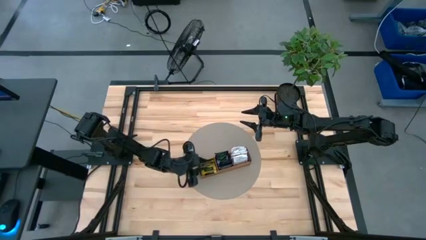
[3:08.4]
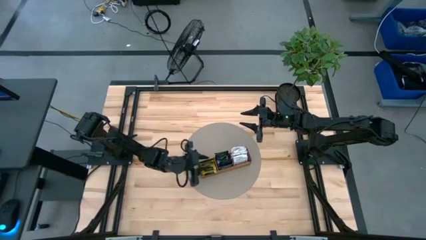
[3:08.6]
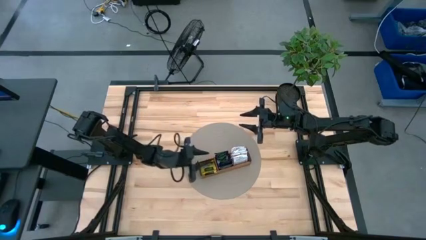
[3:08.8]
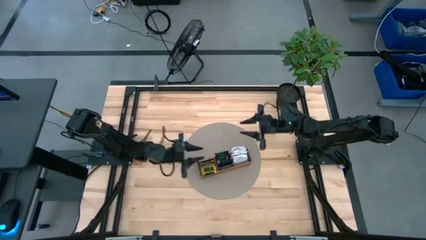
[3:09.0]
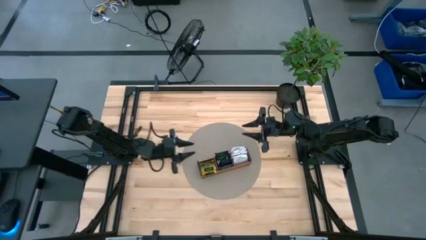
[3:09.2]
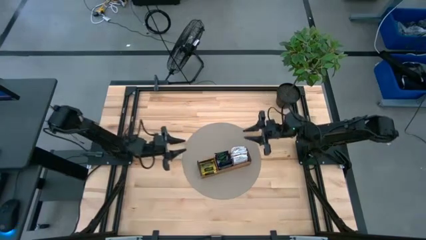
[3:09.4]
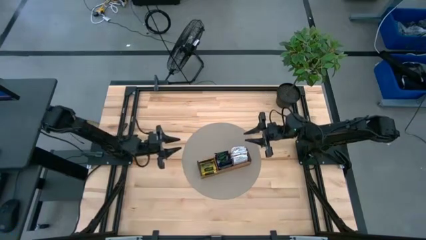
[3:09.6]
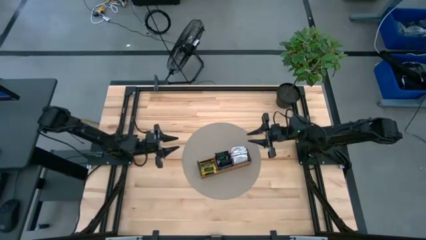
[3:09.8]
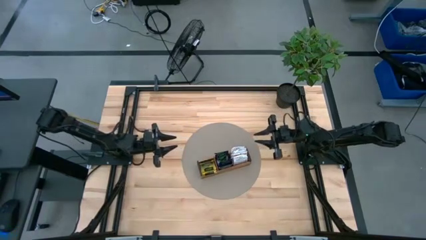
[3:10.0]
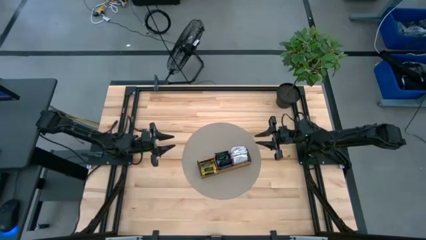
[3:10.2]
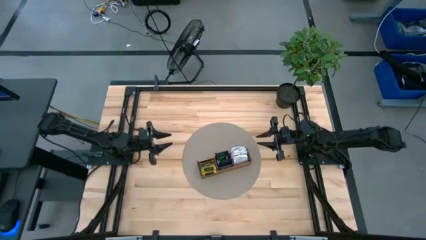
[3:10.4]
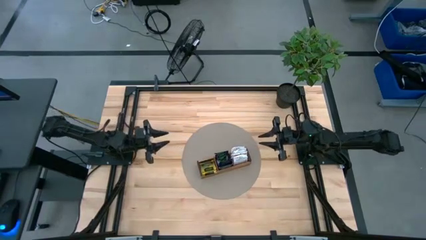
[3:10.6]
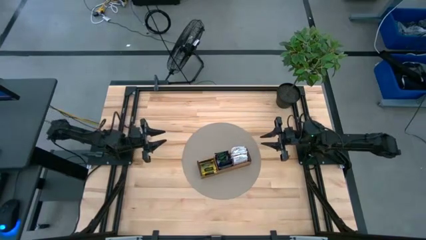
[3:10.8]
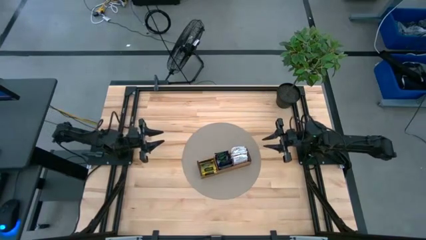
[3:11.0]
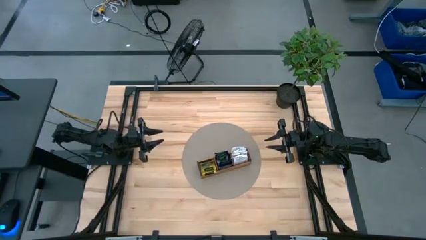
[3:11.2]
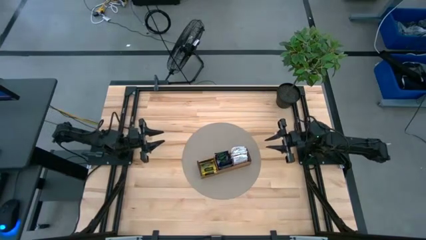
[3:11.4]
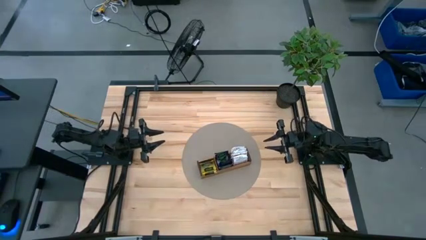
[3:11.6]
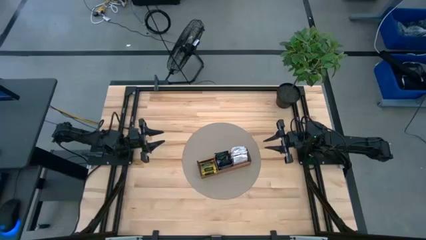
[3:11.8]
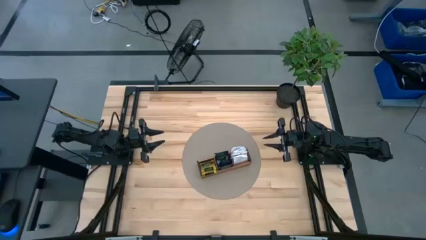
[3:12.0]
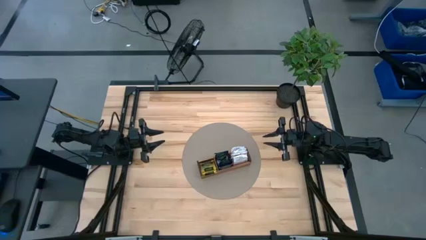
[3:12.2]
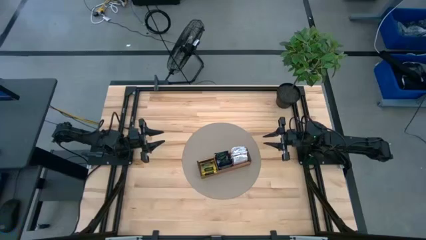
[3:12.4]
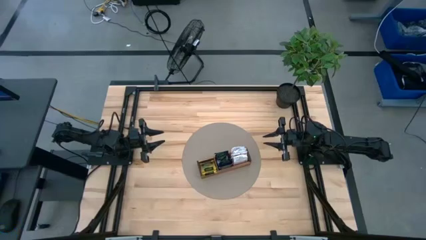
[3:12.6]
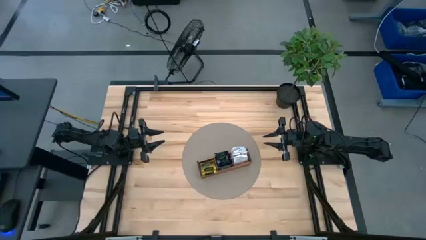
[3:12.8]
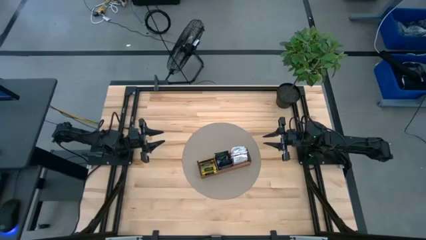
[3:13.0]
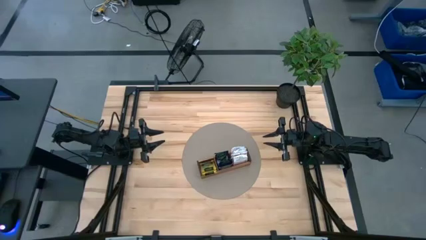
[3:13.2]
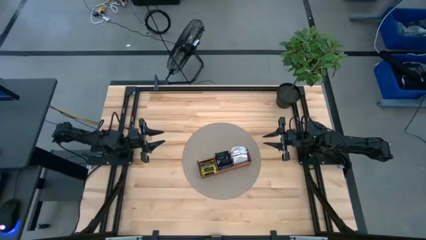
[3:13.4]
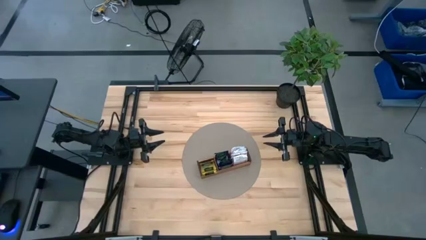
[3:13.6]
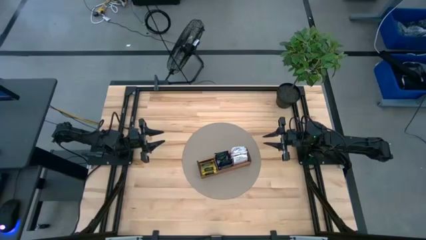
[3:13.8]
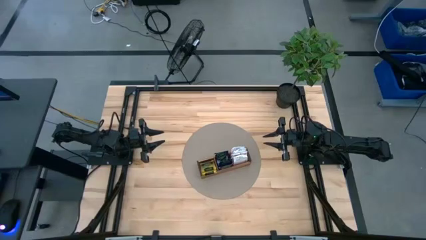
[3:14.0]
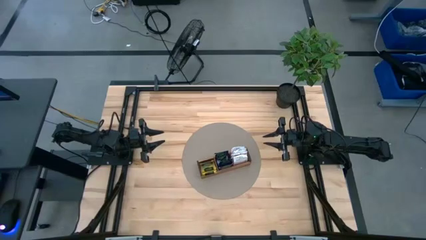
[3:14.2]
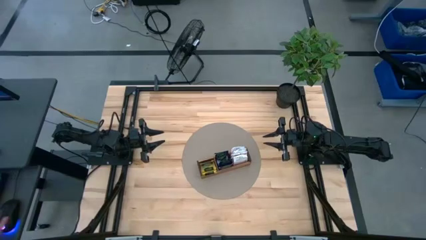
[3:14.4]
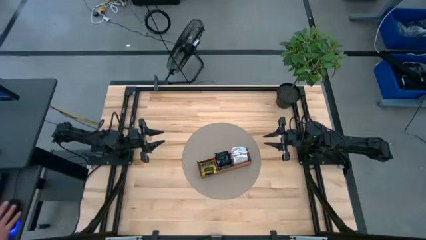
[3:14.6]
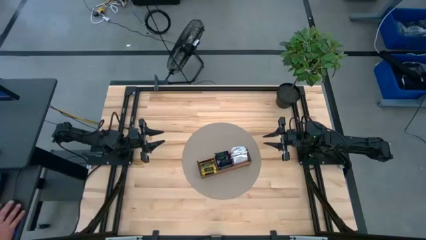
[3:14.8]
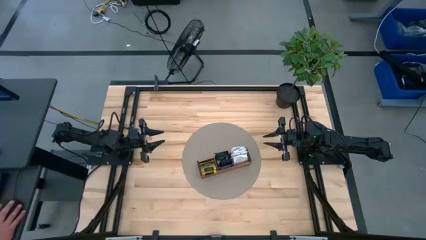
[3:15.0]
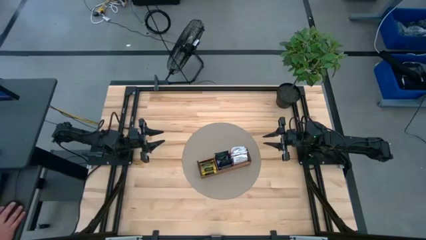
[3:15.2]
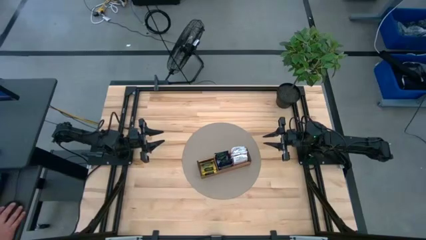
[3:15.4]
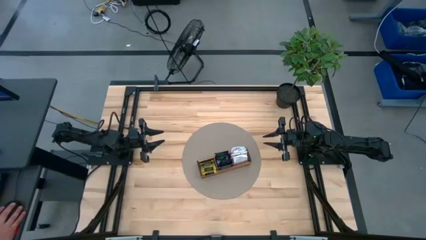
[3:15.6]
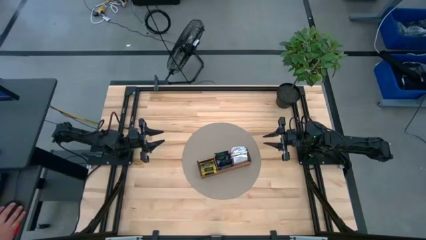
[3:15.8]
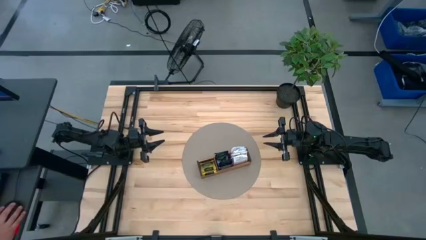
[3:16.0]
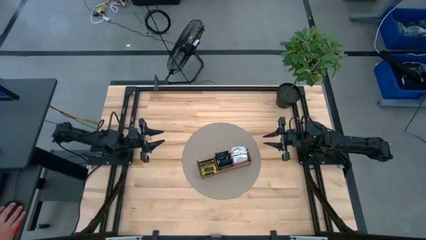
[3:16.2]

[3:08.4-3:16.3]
Task: Pick & Place Tea
Return to Home Position

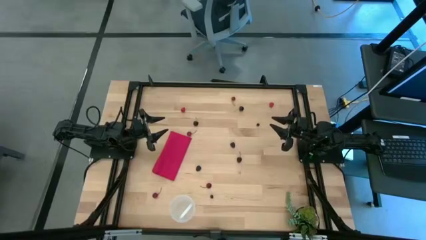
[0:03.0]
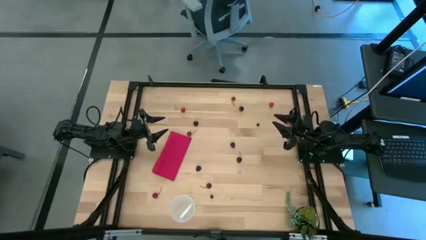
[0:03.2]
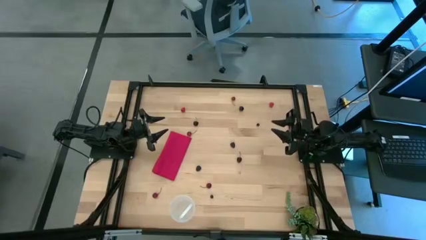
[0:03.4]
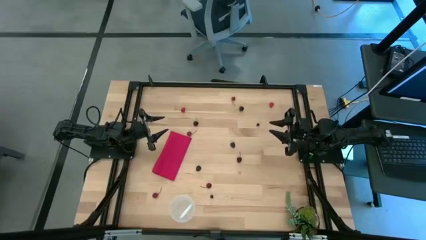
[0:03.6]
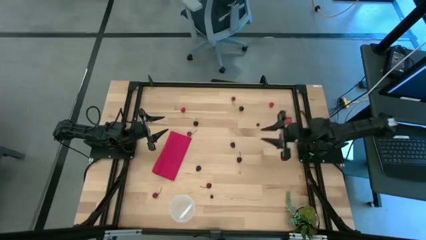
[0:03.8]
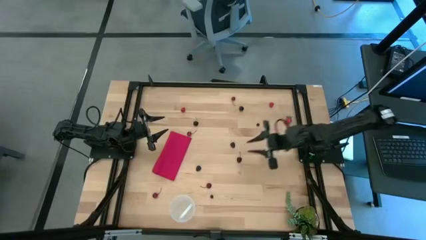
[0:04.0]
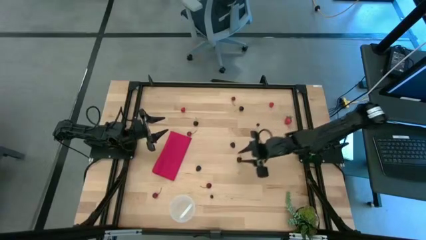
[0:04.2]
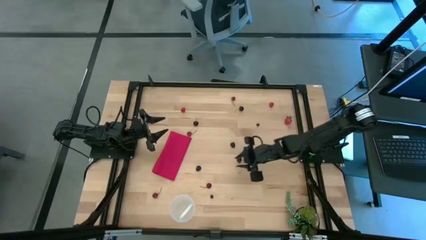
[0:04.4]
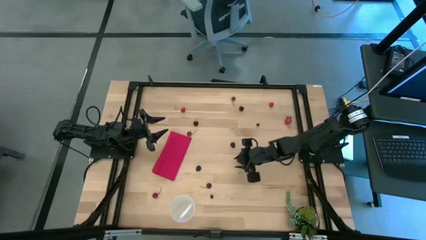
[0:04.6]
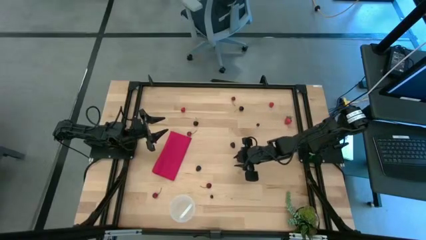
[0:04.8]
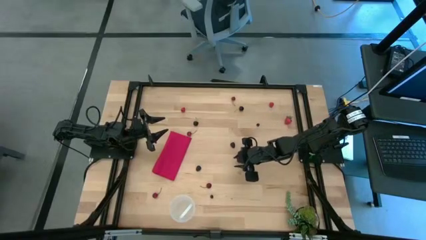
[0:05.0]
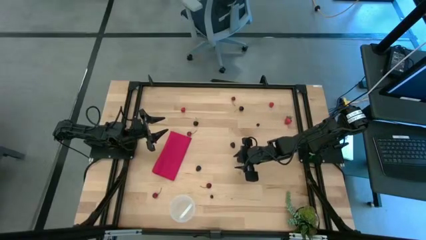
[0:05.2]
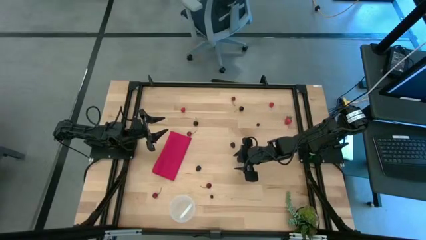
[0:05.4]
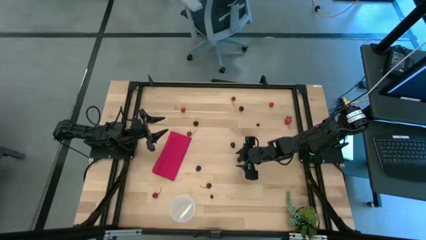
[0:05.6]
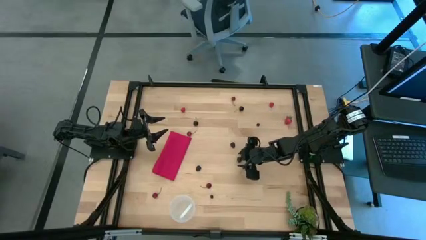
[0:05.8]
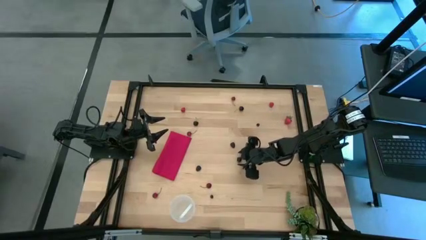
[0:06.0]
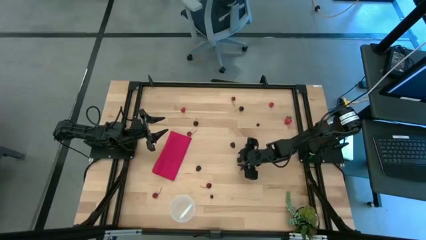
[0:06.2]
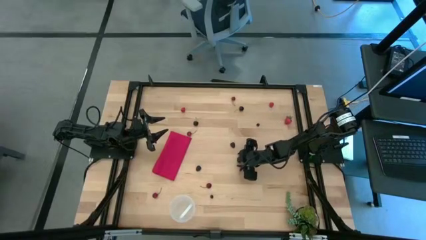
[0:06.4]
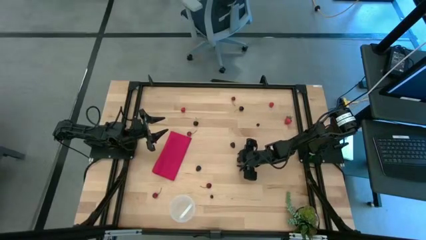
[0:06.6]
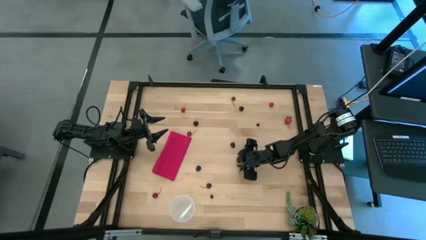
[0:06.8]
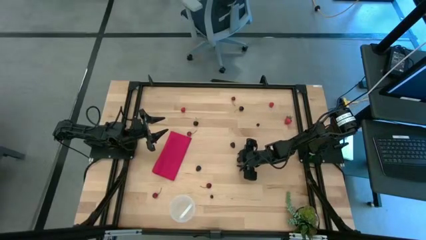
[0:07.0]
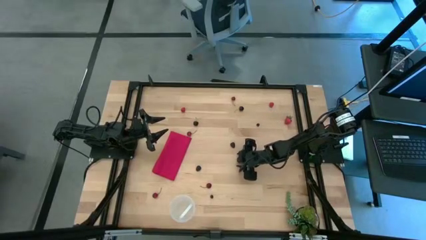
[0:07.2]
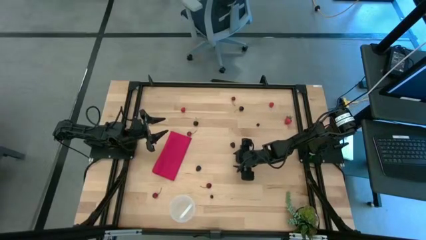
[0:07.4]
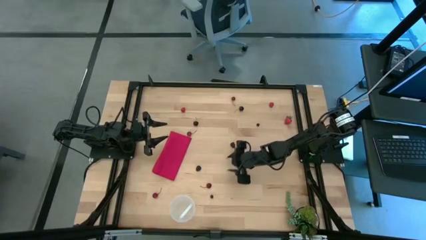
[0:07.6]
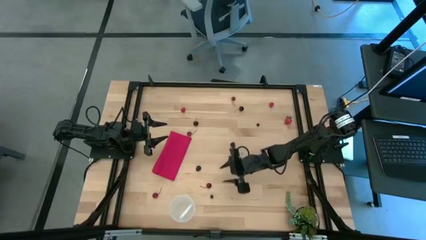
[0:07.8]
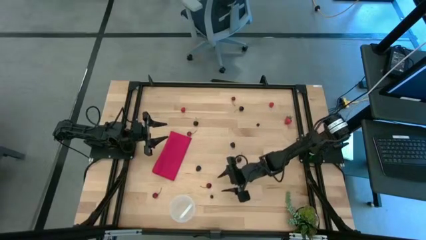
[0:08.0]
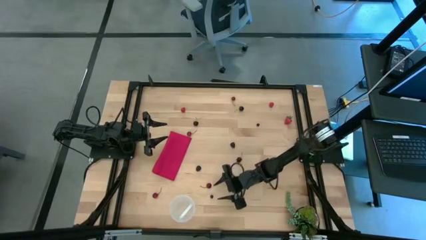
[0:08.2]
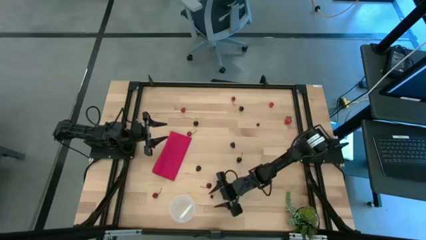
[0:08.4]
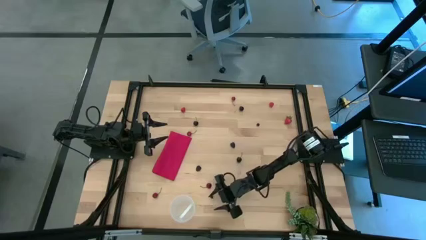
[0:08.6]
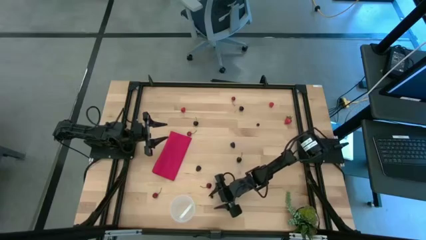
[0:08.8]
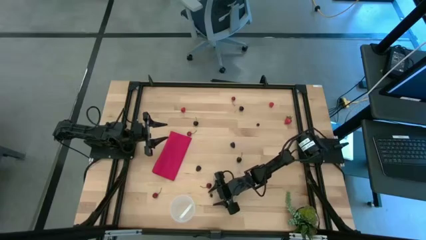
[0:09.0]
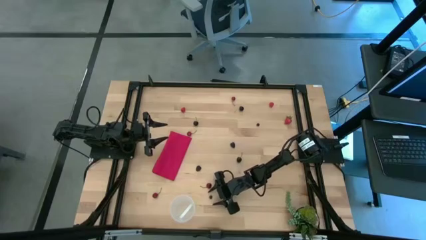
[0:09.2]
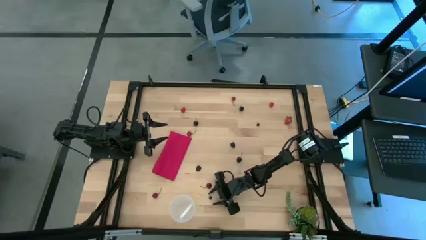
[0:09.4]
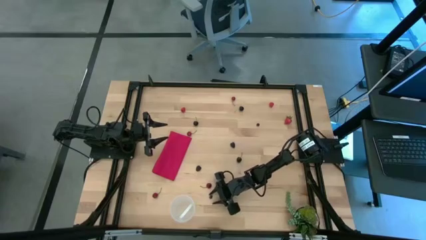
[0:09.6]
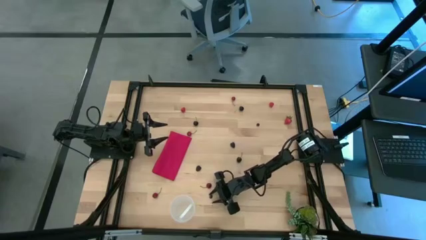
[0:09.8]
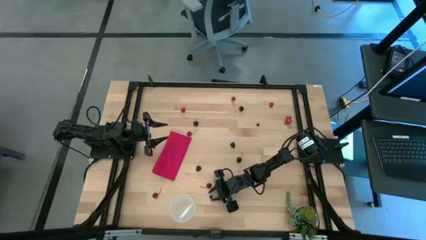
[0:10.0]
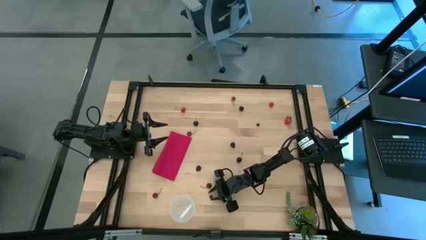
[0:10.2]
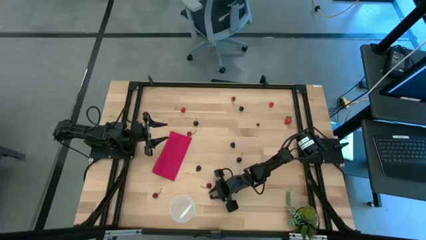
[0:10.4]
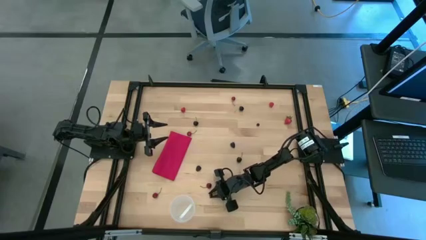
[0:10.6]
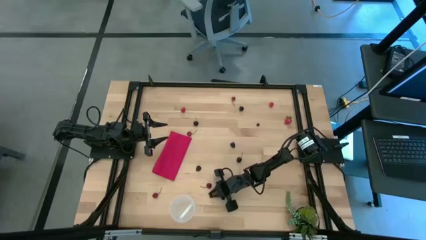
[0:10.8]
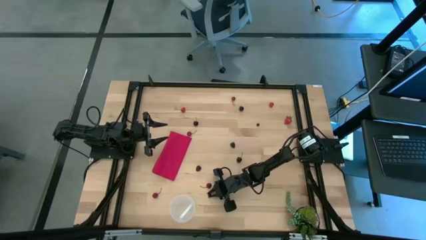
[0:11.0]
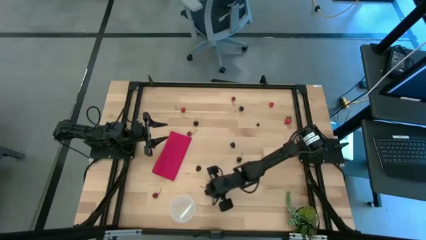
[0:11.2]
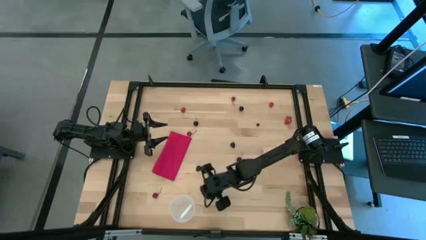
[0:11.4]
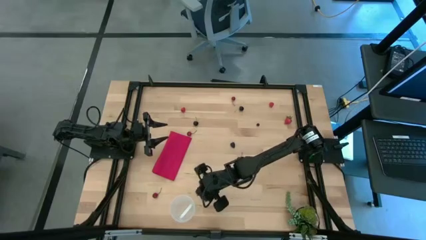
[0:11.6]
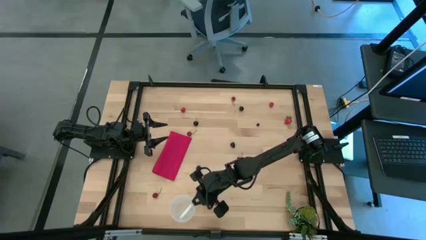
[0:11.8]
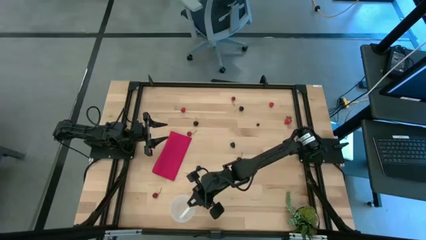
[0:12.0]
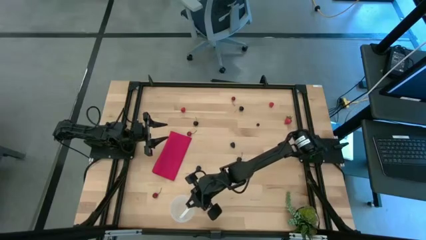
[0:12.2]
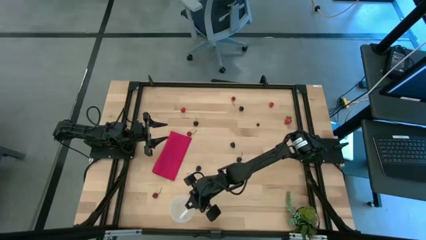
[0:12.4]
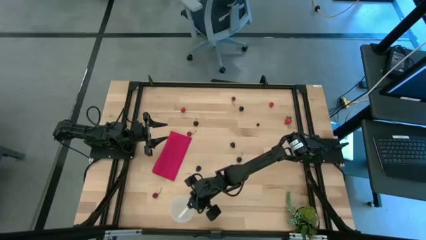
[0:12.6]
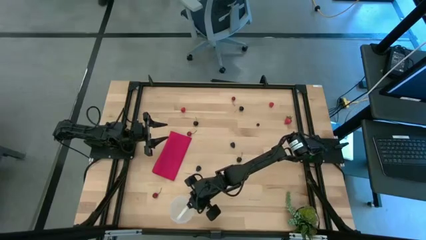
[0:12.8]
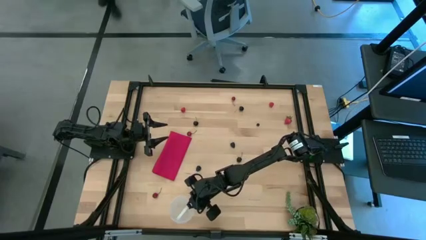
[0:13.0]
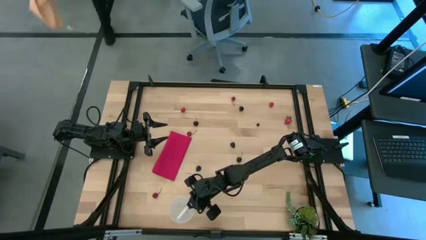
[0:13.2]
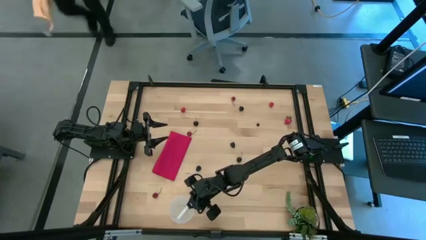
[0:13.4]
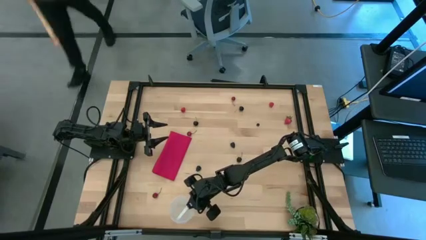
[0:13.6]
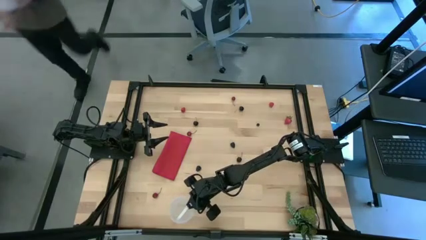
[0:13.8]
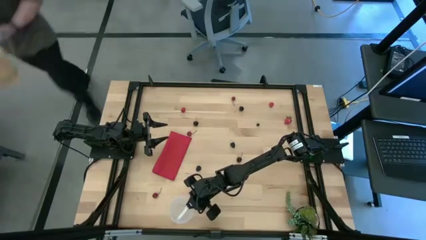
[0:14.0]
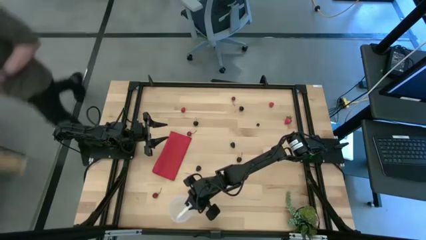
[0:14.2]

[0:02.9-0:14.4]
Task: Pick and placing Produce into tupperware
Put the blueberries into the transparent bin
